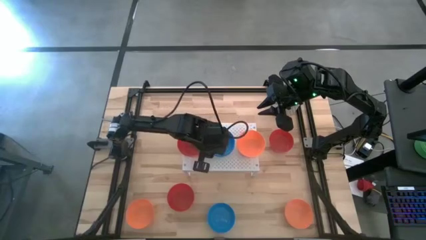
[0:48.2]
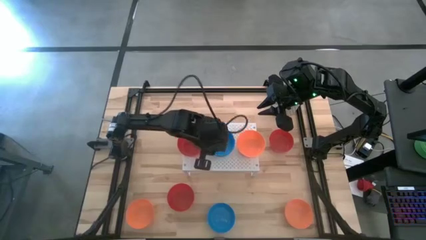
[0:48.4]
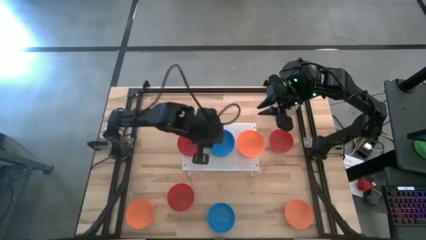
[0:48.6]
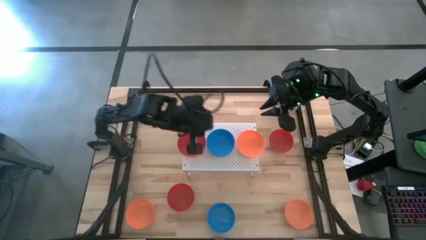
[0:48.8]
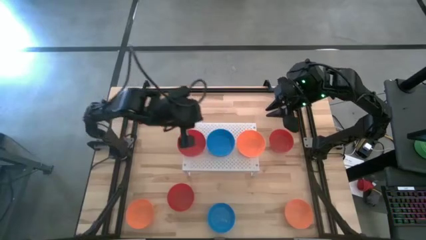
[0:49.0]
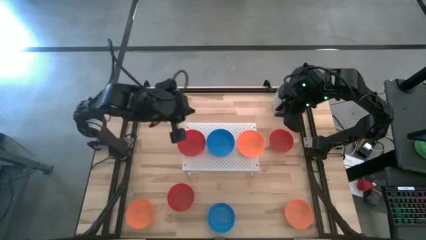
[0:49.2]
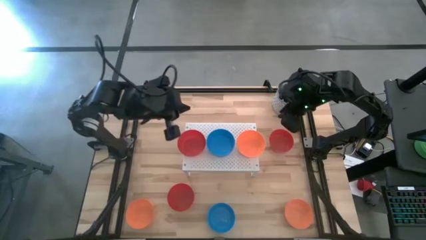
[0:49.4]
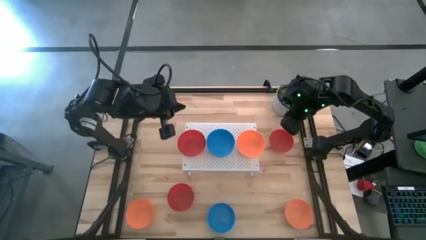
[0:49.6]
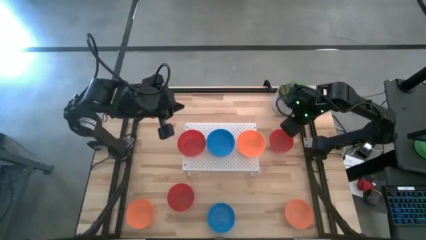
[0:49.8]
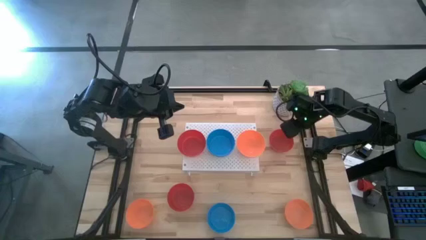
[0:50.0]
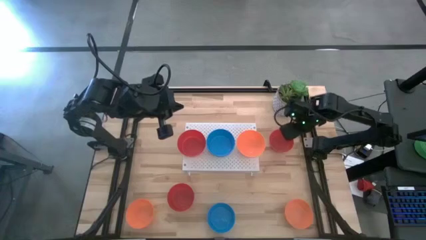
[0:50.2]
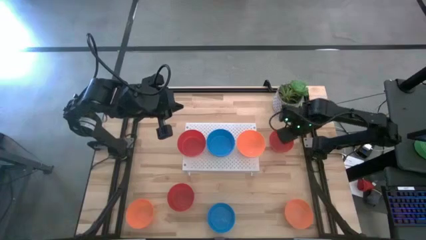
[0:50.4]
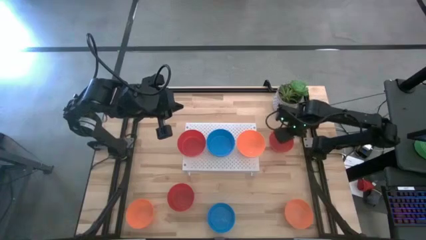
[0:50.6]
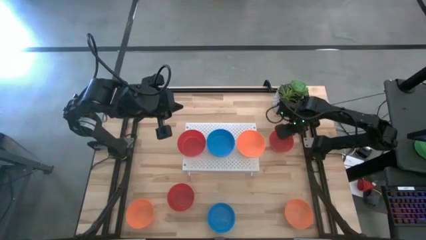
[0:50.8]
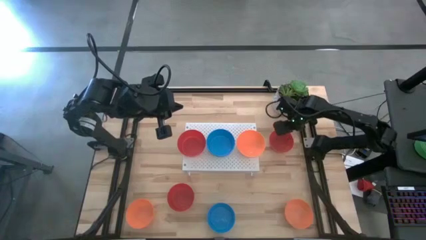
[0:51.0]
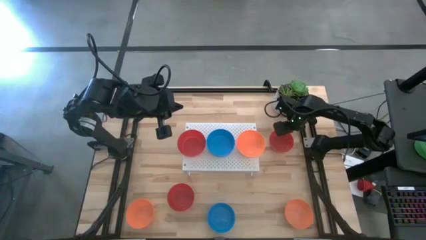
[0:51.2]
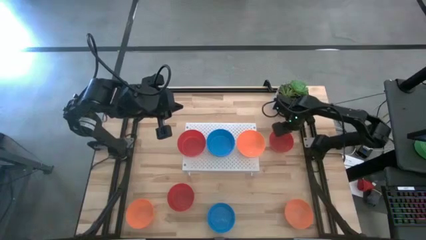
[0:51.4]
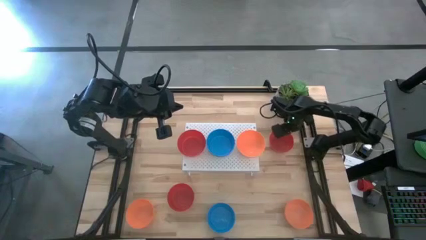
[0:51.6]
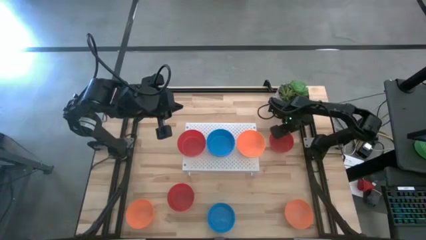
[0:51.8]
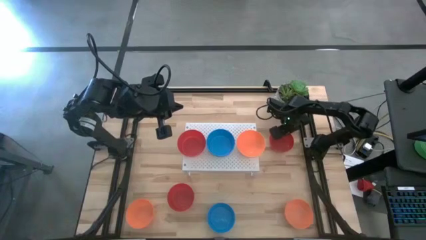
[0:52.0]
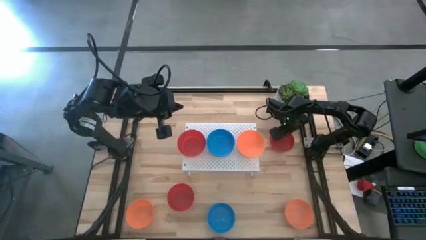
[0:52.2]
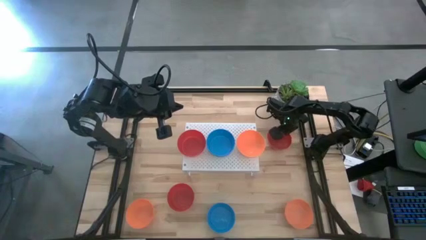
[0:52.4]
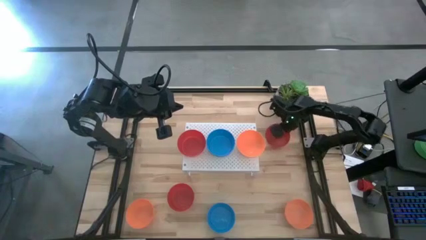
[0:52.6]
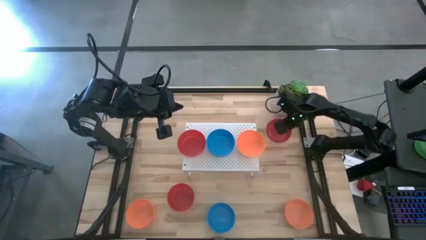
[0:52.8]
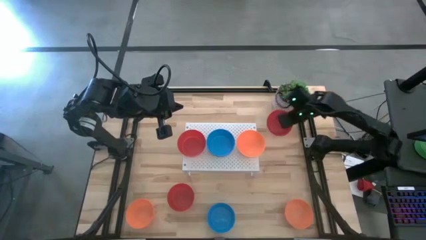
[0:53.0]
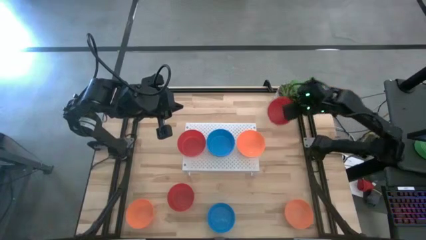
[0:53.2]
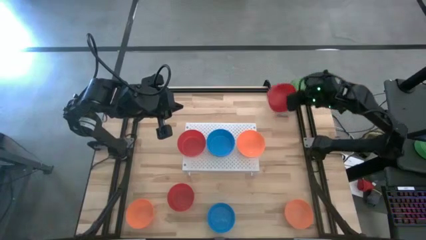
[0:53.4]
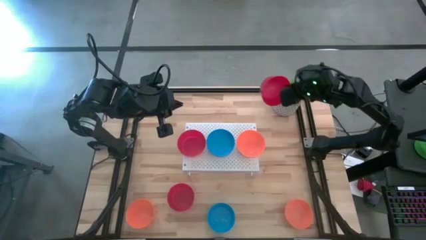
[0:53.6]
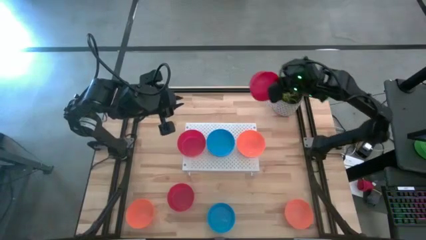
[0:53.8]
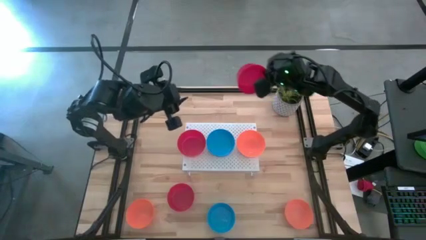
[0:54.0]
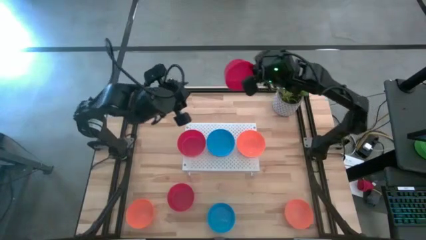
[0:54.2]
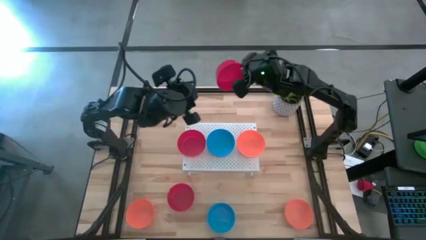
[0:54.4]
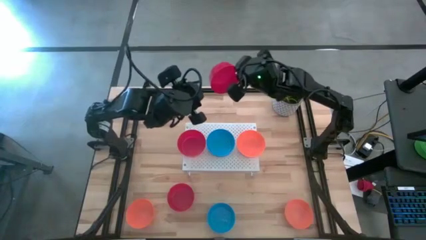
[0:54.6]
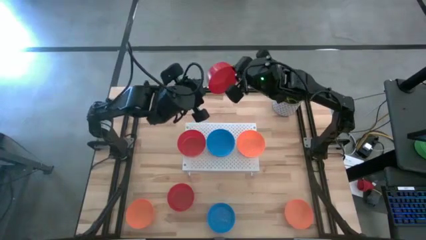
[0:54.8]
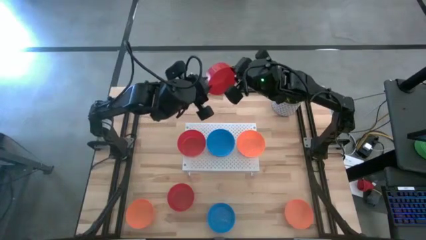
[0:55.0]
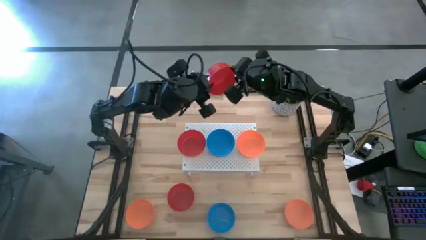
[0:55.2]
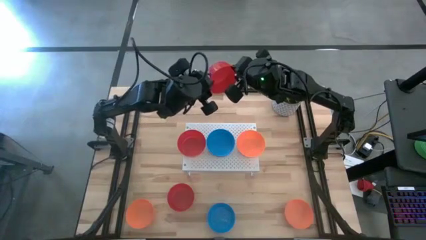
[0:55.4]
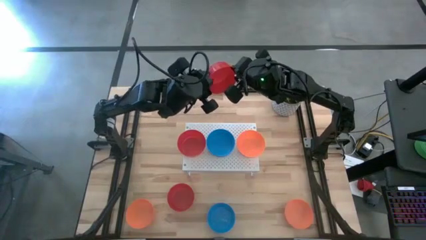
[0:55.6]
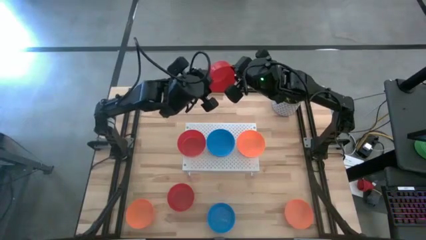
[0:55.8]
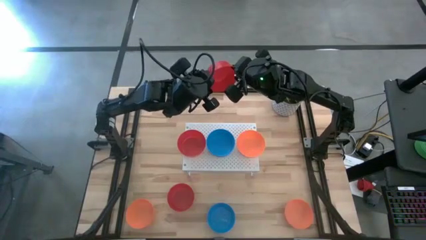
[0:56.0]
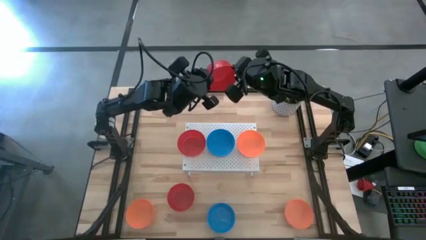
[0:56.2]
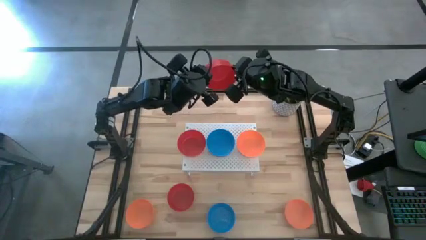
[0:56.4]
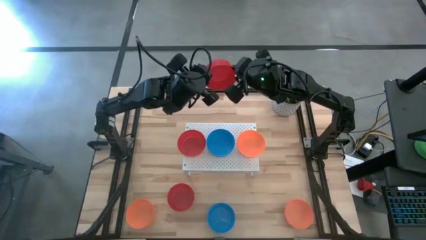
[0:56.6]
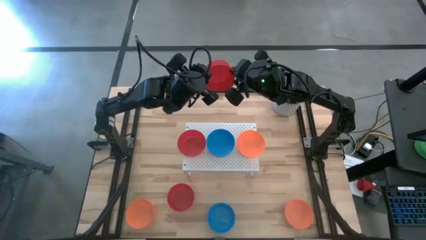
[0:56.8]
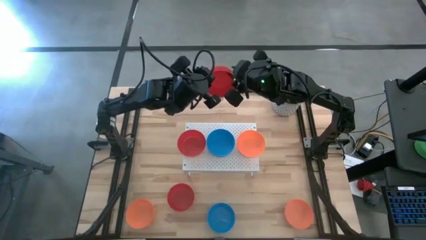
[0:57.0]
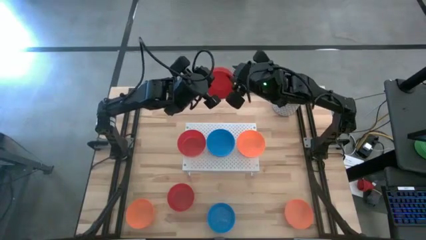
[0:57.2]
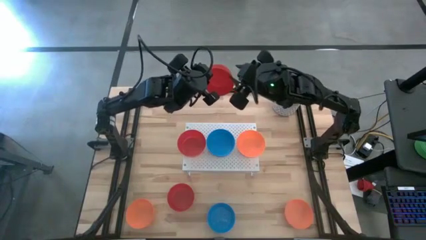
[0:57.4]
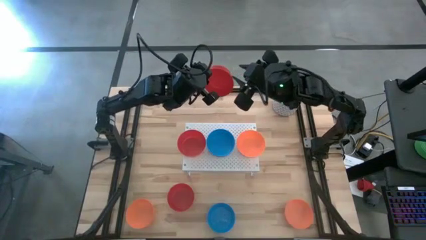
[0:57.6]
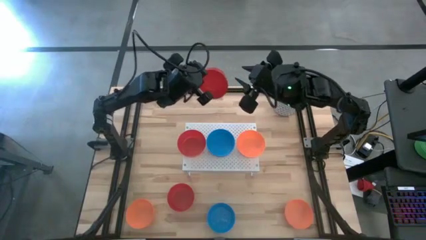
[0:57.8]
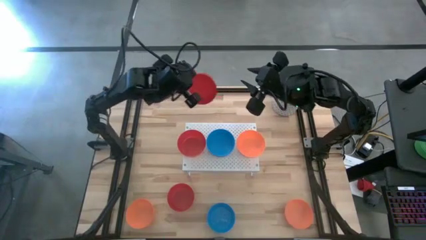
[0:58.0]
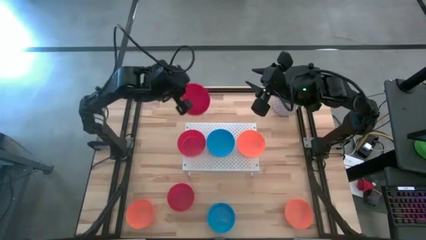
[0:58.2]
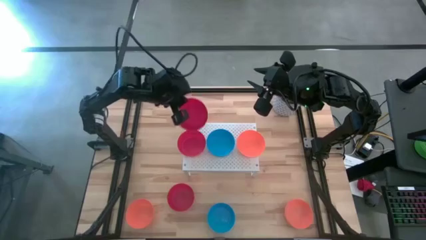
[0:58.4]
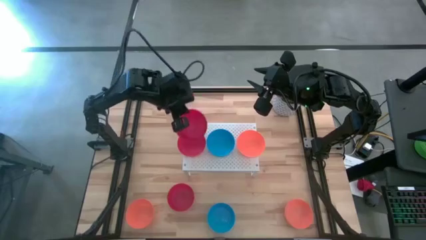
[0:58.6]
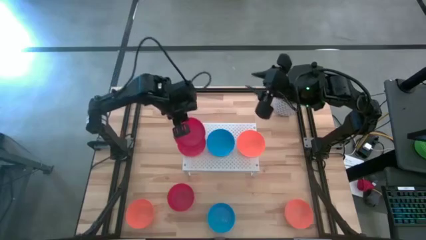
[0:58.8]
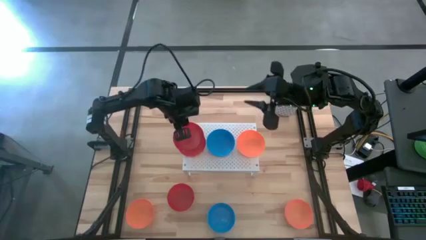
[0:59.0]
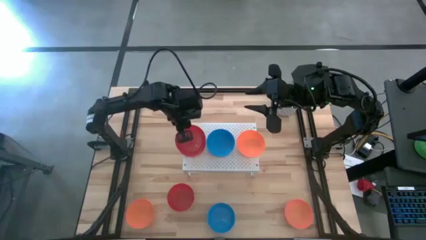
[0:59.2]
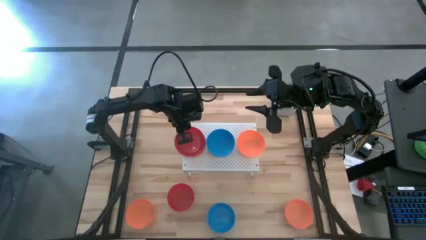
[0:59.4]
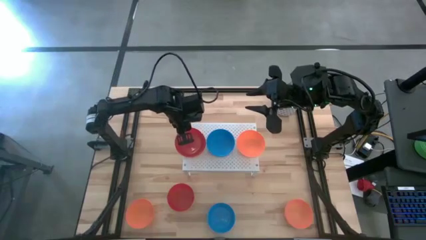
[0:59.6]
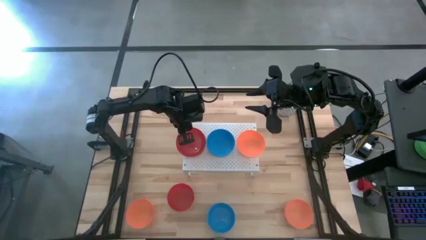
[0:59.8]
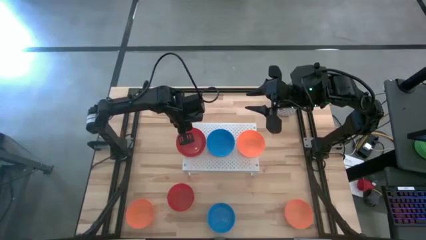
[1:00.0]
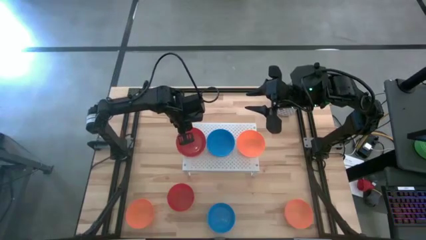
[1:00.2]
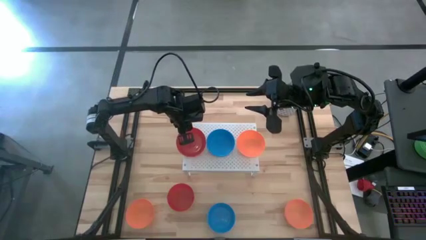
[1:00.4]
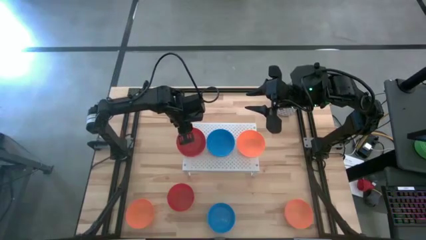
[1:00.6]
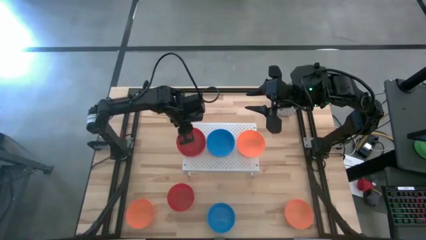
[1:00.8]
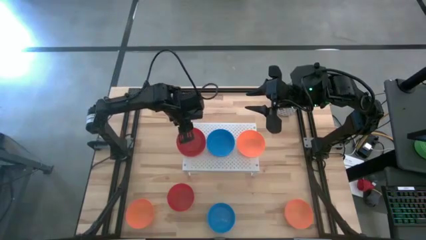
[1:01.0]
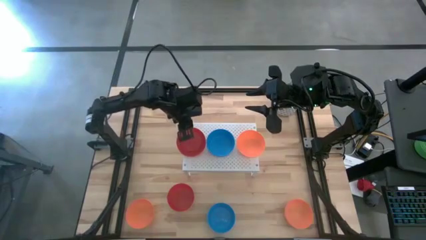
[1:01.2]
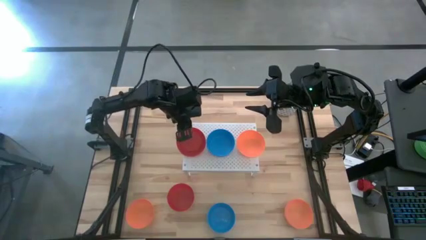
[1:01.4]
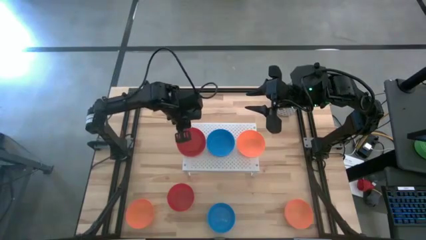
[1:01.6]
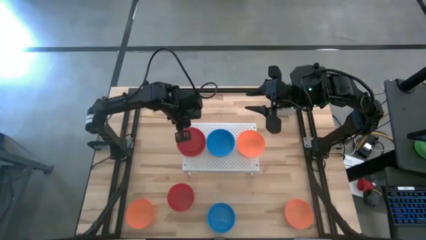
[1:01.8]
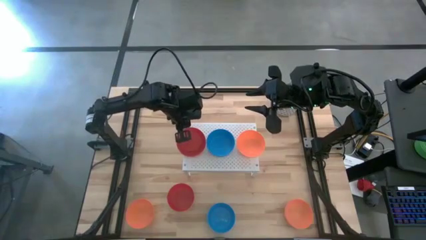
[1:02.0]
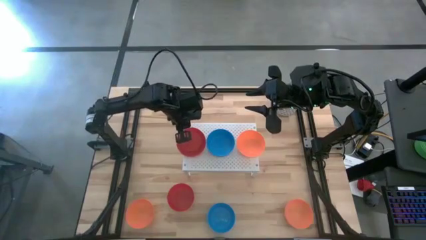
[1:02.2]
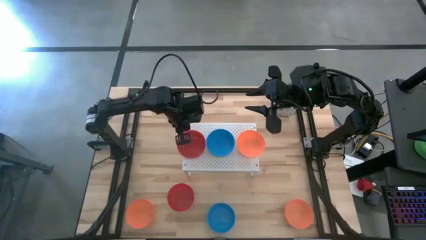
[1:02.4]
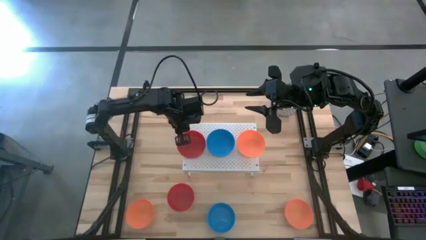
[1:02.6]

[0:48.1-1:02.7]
Task: Pick & Place Mini bowls
Stack the top red bowl on the red bowl on the shelf

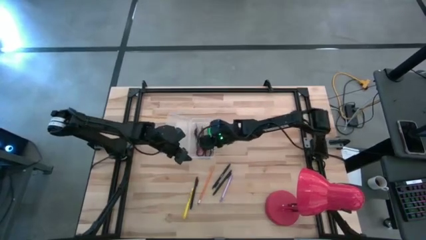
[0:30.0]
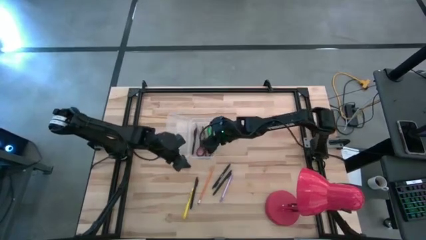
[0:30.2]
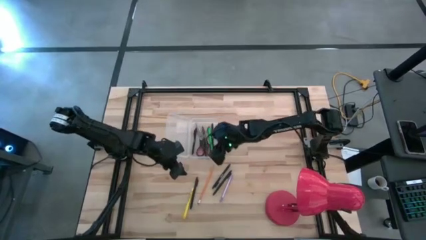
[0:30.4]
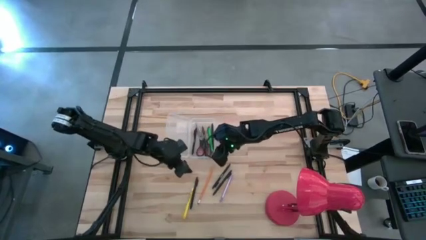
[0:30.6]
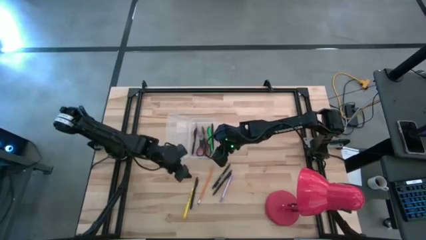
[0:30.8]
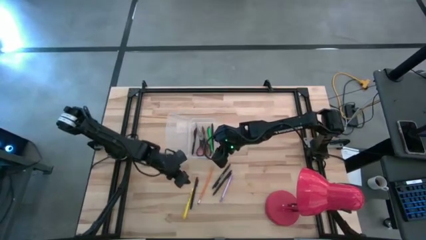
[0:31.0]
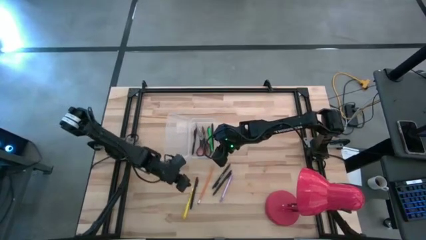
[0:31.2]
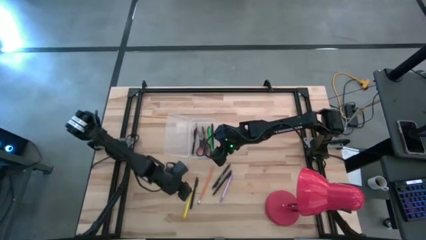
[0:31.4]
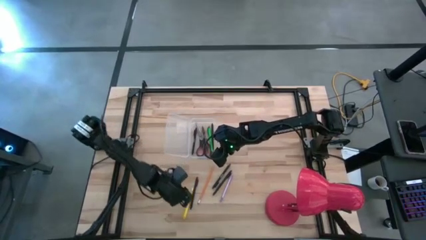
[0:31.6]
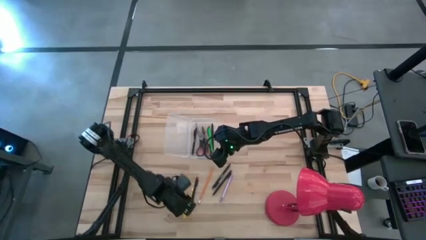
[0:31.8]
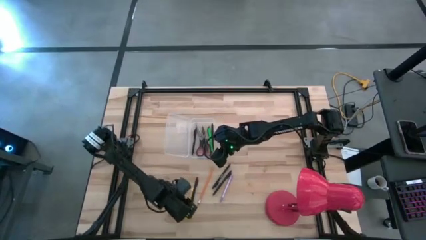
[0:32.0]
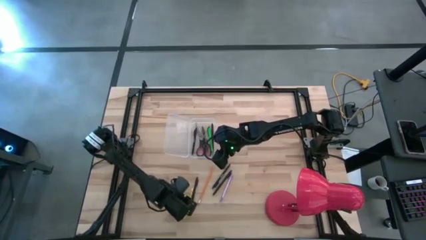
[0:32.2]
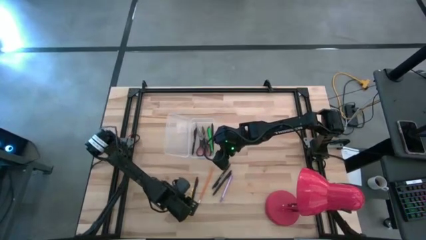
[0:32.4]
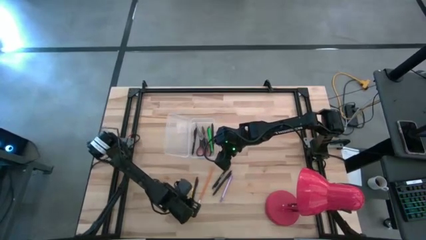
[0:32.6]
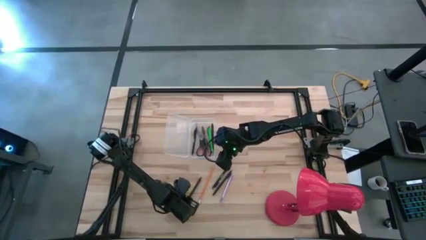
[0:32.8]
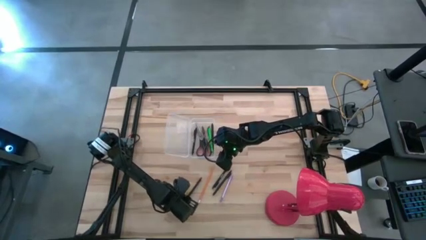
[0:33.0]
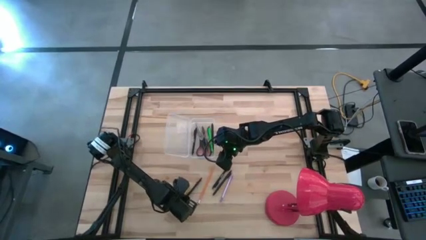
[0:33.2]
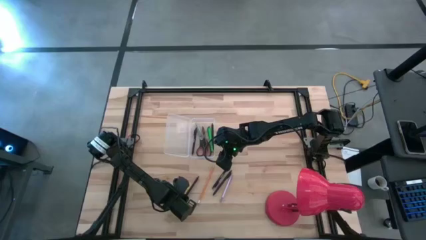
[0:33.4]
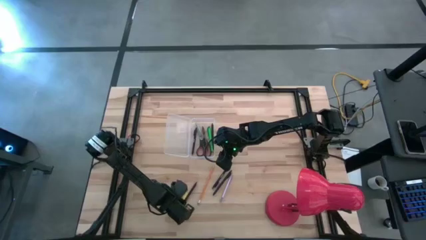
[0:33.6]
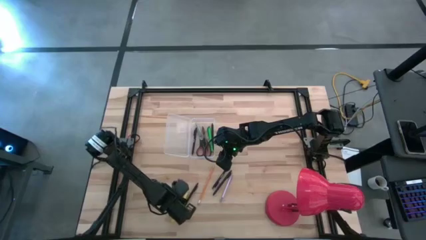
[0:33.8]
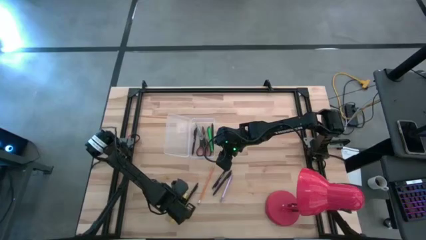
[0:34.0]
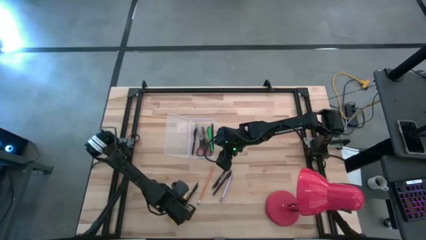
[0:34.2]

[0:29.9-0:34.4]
Task: Pick & place school supplies into a supply box
Put the yellow pen into the transparent supply box
